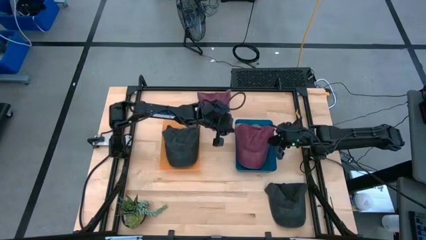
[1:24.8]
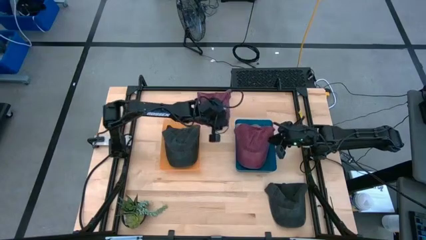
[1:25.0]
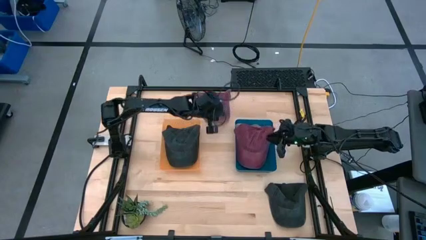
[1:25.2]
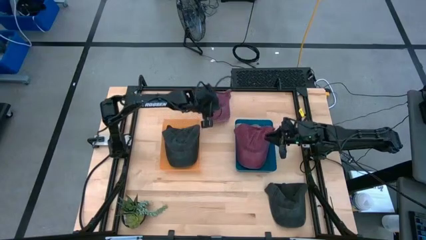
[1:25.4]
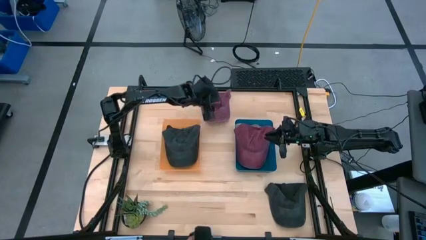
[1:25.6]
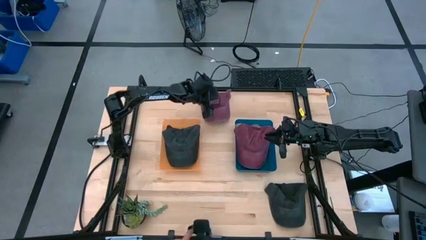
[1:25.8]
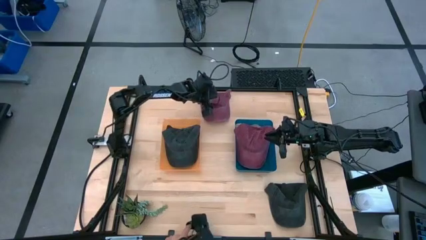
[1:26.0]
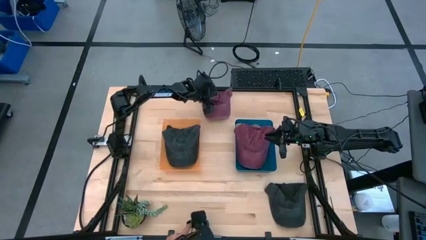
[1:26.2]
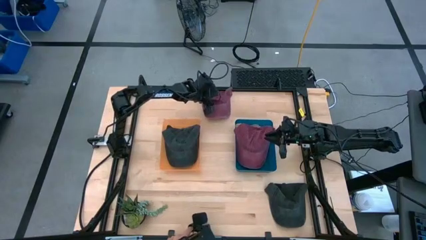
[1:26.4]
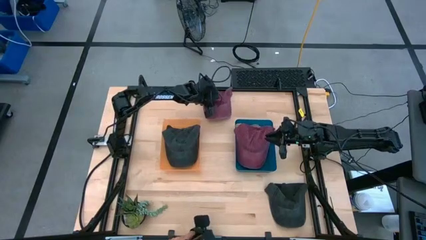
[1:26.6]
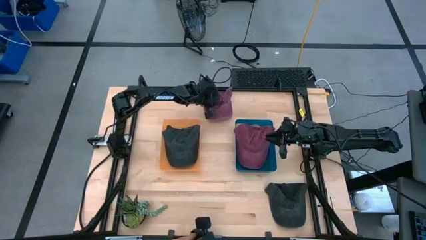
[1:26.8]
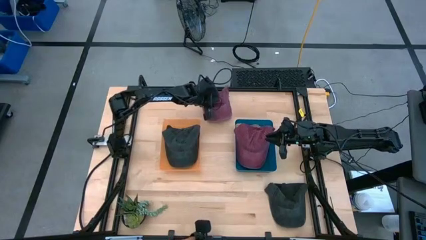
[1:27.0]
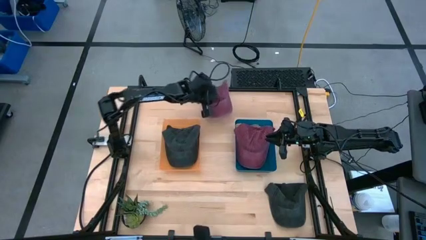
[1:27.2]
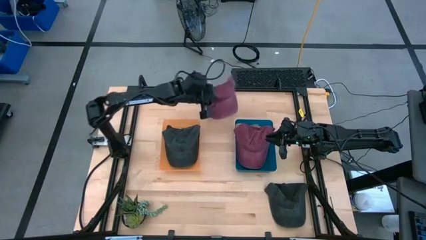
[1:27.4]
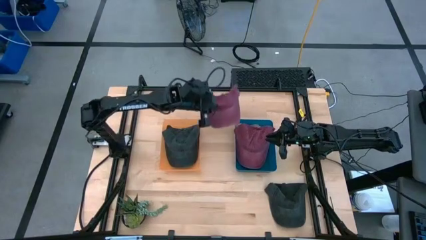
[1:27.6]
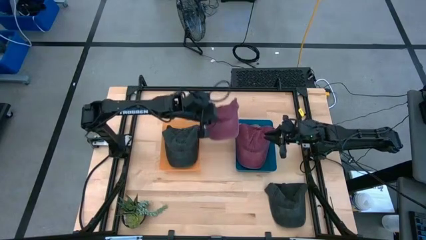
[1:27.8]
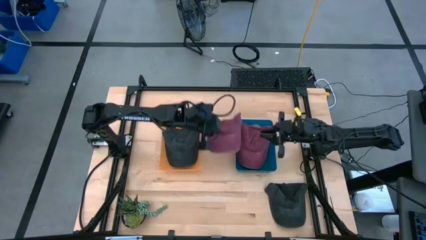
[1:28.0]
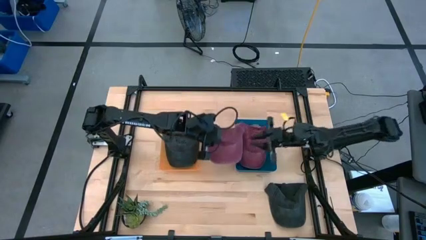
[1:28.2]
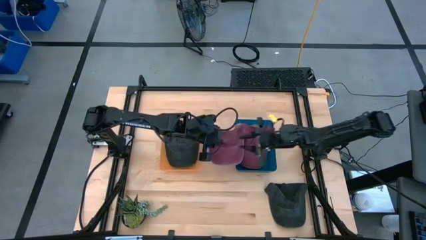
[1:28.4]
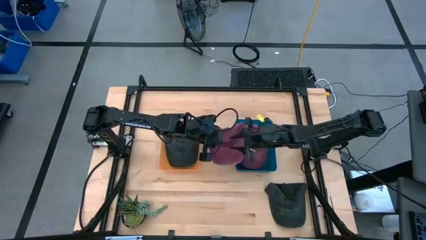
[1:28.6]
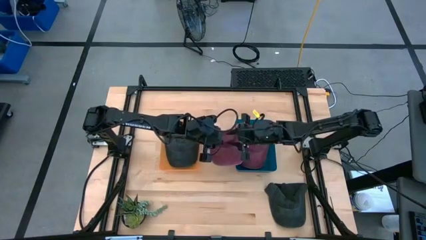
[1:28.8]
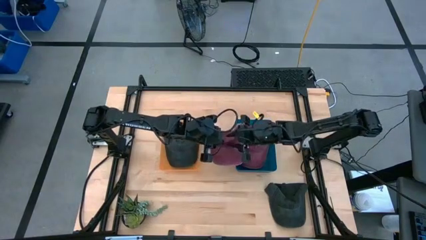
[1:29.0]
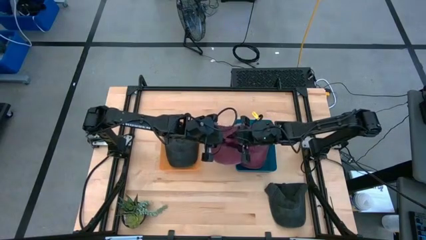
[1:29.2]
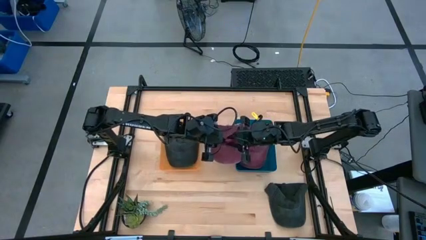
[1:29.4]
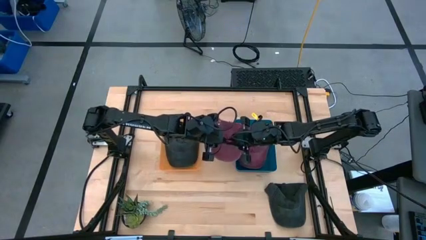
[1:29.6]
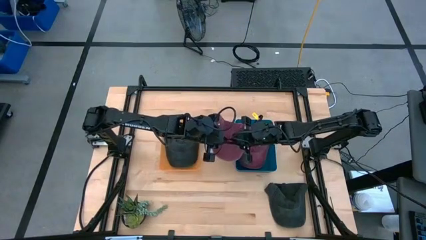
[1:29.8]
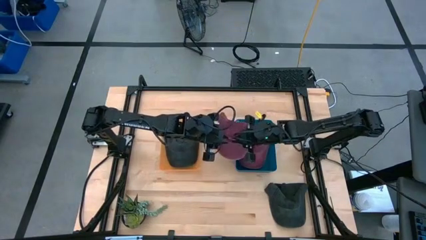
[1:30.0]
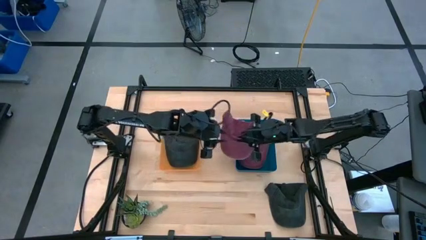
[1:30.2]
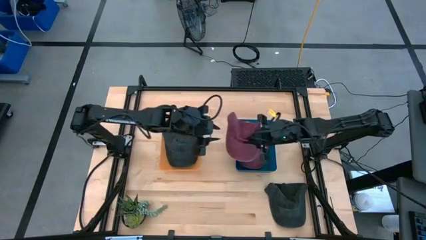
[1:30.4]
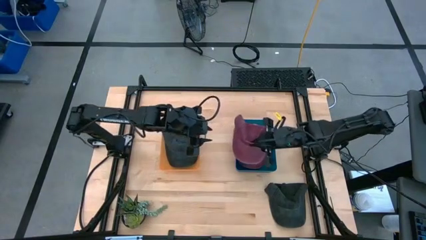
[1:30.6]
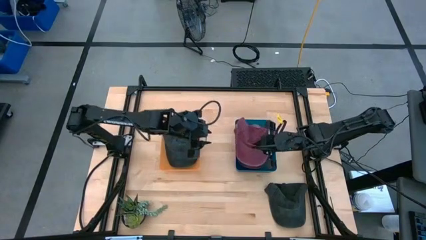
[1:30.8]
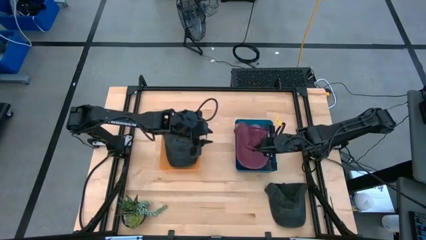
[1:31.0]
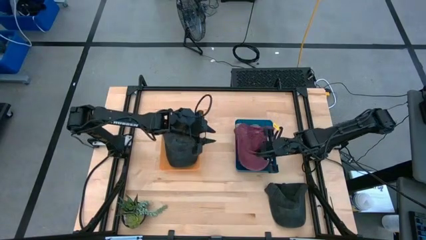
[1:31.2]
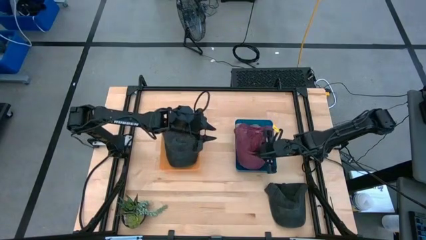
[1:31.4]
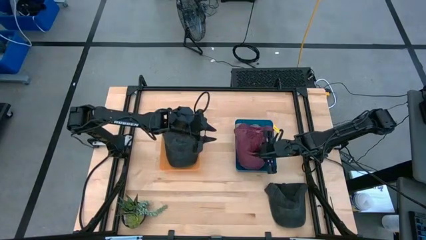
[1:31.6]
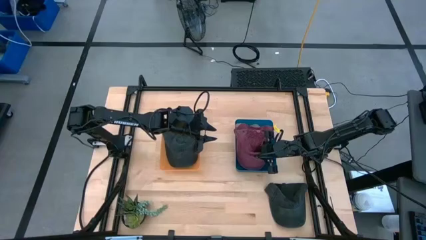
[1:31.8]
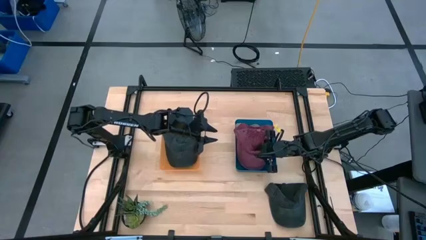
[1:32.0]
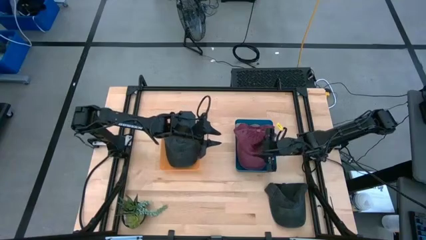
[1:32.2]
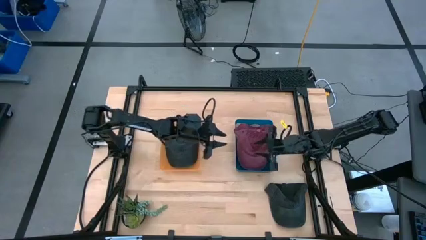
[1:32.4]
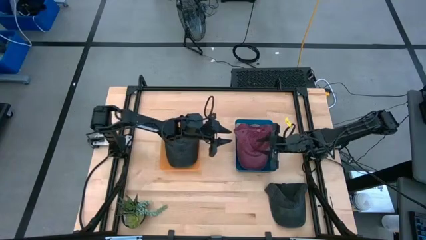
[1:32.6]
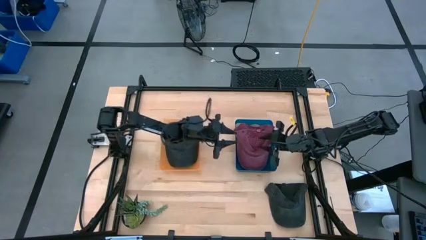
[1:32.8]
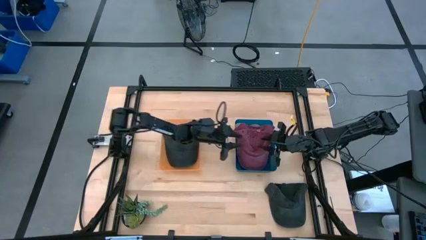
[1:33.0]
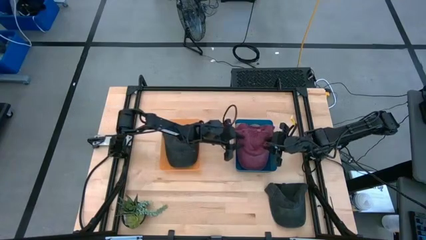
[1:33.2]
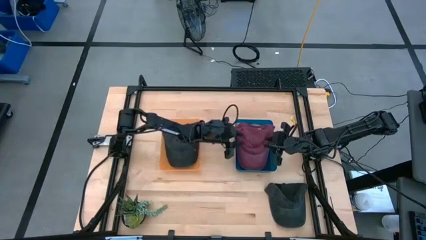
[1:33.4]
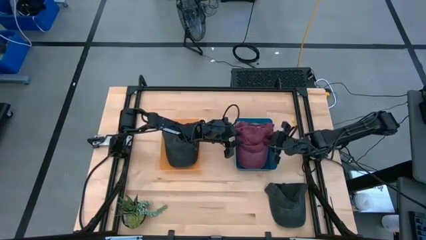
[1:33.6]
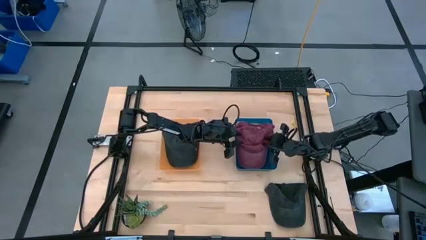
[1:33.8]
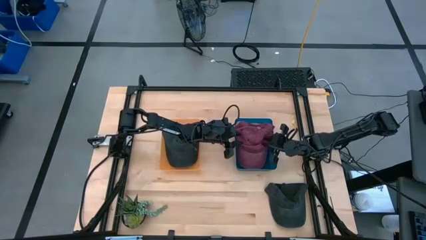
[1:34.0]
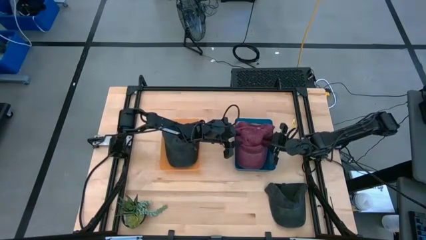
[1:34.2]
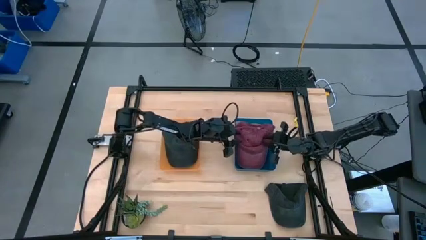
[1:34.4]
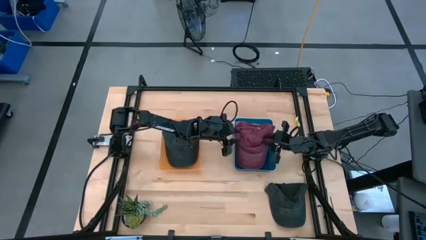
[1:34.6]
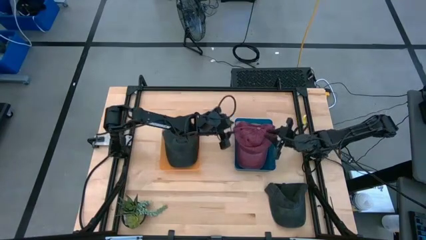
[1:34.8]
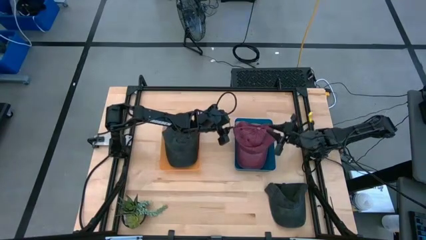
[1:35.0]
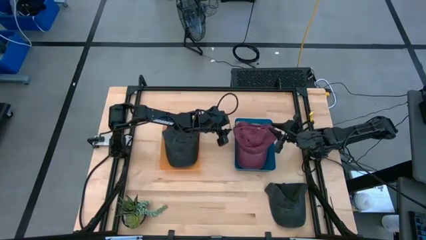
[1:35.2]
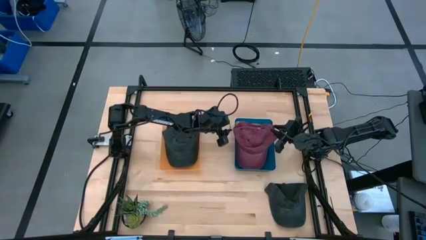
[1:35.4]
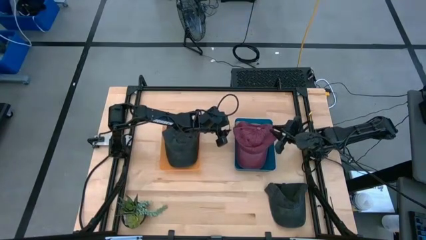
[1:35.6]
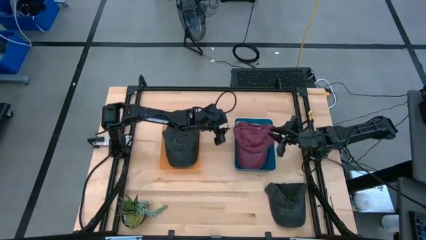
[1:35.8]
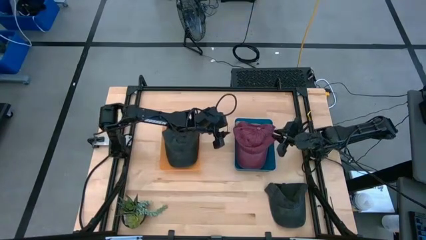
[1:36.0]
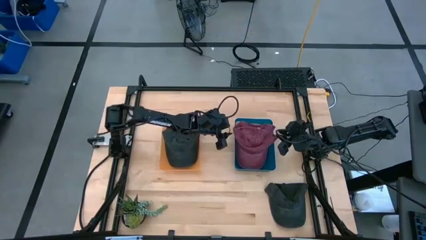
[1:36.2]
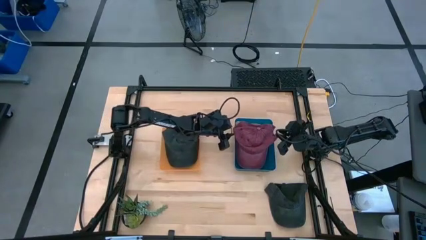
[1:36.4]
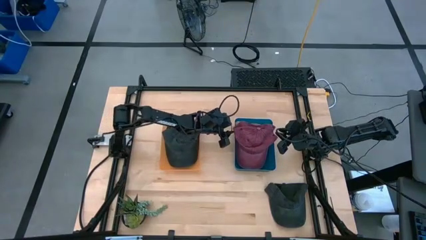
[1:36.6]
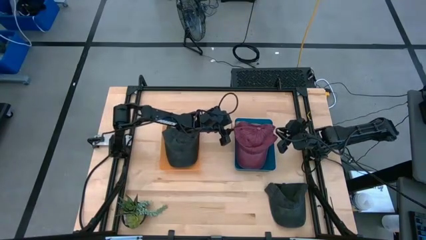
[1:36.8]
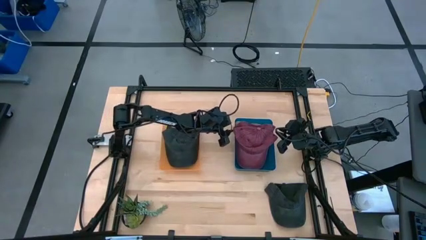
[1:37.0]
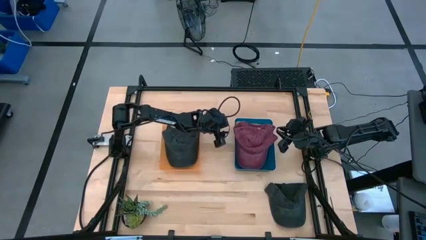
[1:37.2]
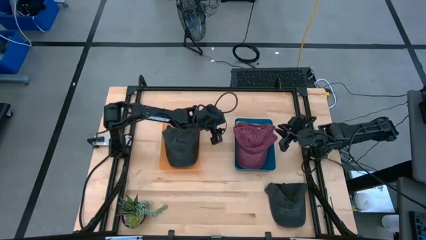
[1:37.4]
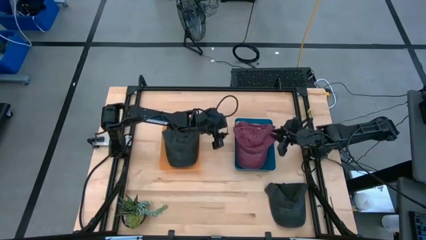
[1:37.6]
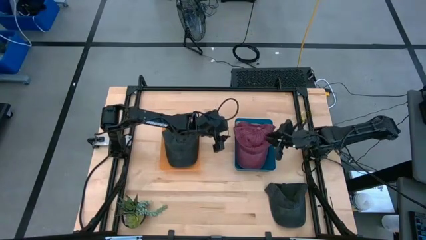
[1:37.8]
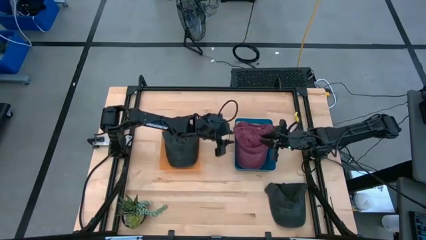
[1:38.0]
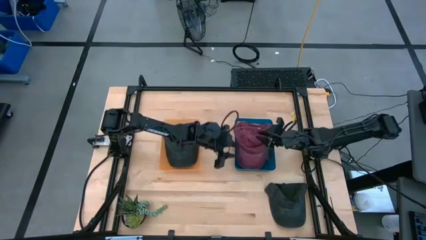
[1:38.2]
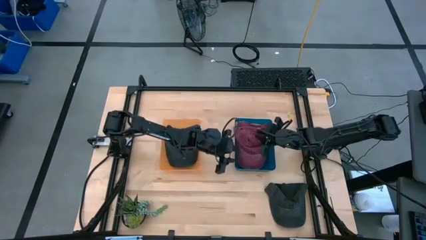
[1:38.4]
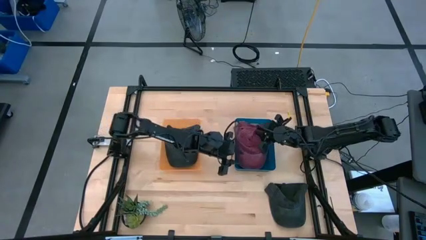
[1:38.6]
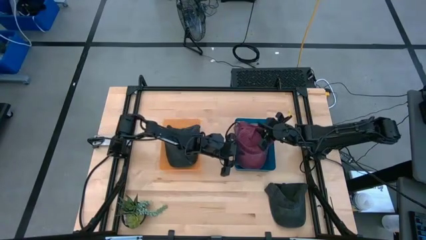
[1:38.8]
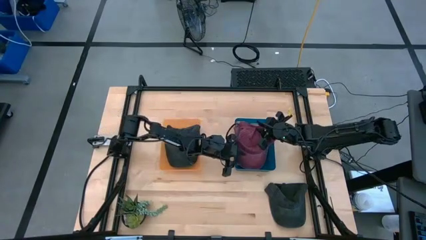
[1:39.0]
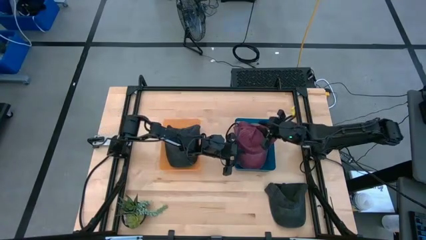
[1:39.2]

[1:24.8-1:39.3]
Task: Pick & Place hat
Put the red cap into the blue bin

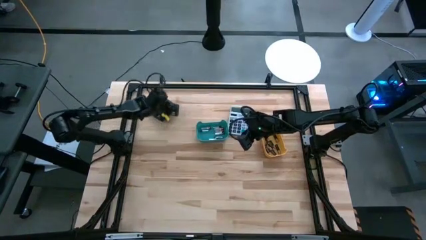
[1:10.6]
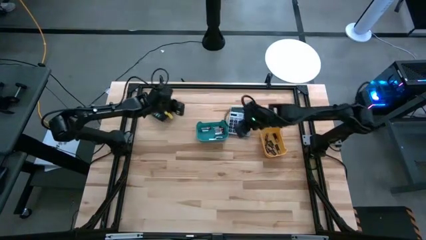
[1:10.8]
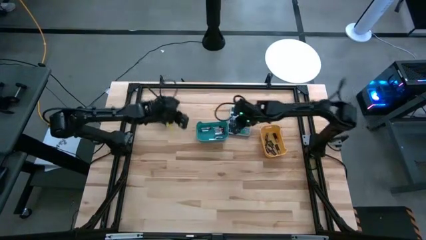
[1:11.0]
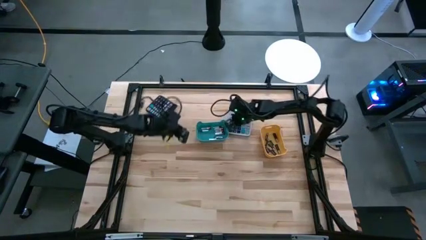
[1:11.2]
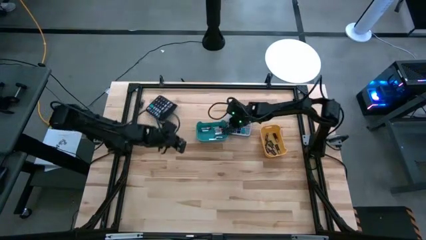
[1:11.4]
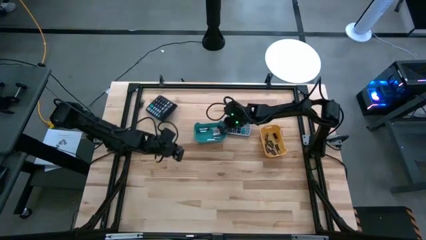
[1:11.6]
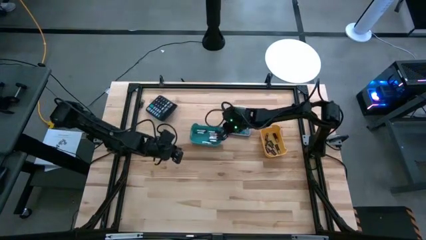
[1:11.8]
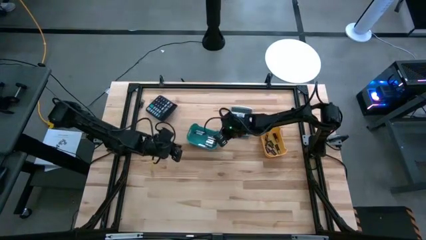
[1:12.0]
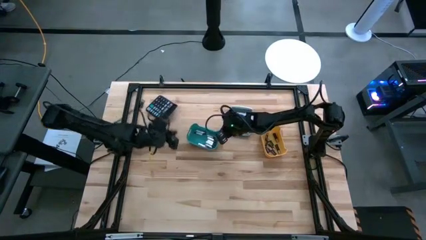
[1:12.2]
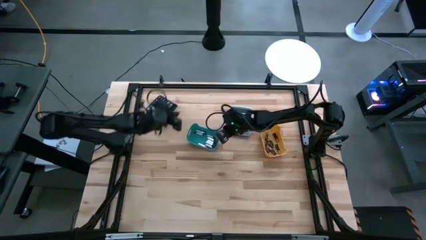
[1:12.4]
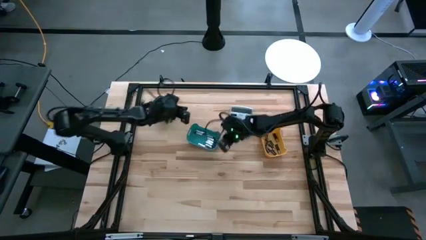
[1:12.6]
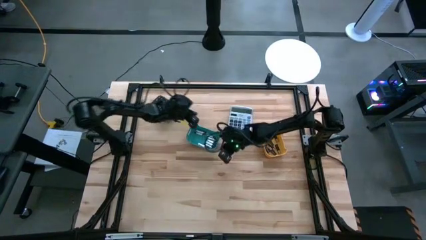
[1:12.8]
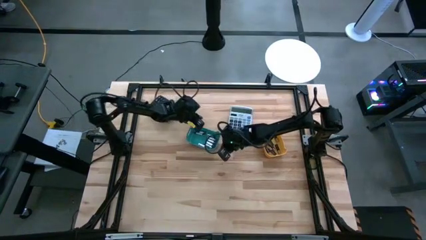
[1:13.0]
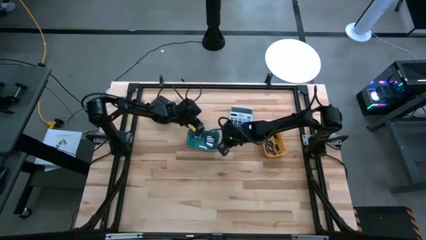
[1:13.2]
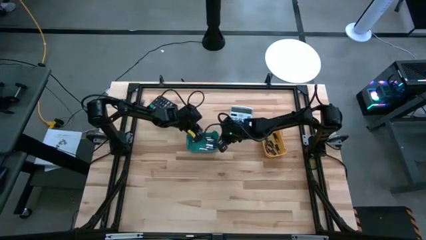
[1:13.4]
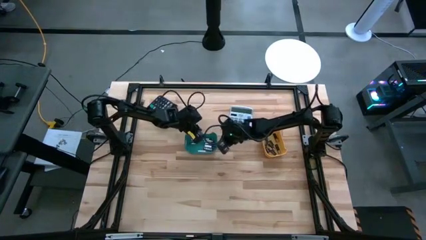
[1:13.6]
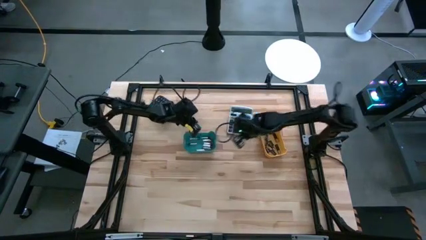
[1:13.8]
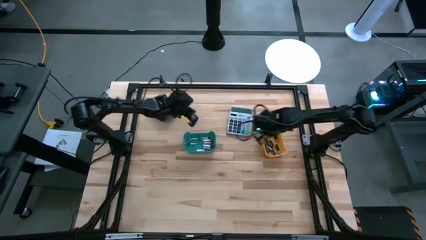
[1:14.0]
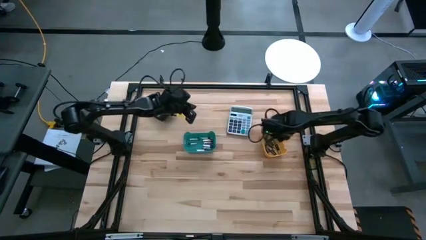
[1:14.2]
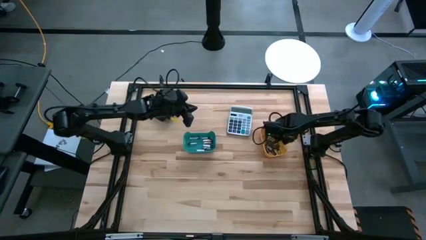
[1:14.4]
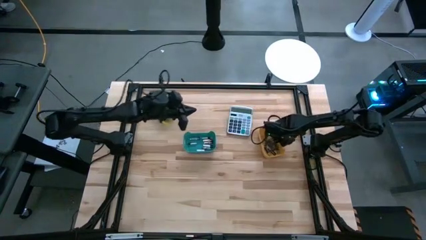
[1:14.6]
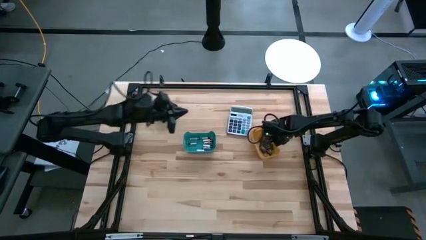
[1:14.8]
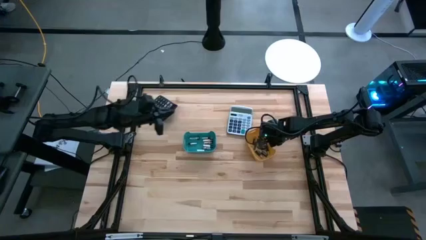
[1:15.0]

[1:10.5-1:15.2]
Task: Sort batteries
Adjust the bins
